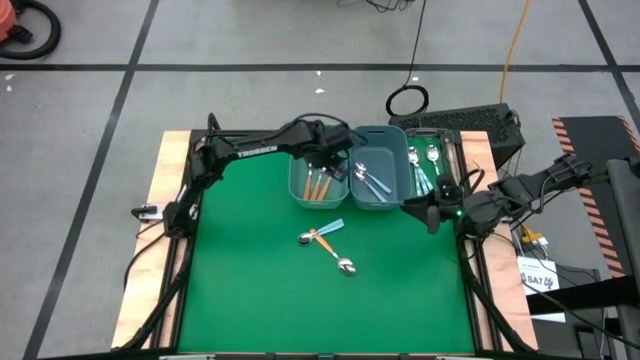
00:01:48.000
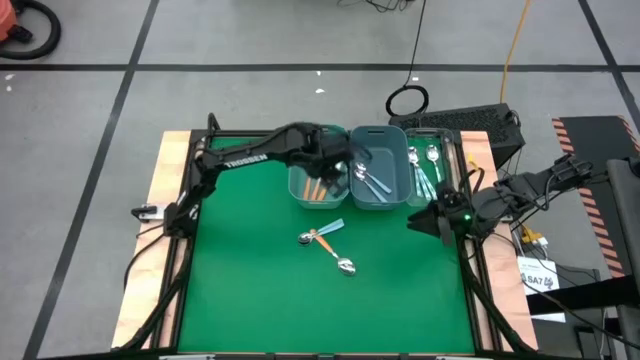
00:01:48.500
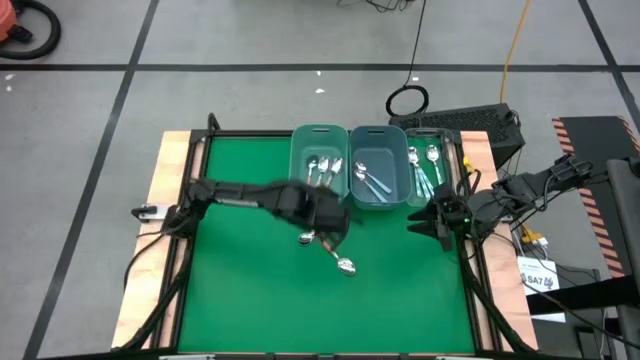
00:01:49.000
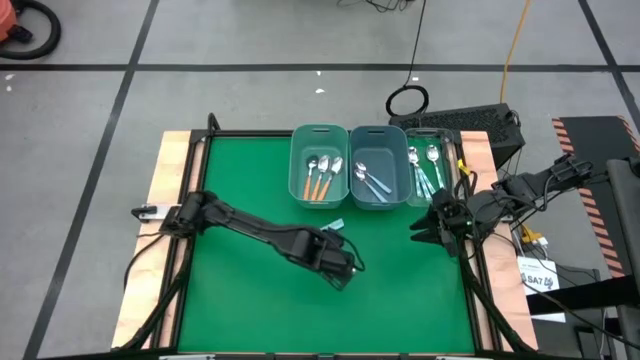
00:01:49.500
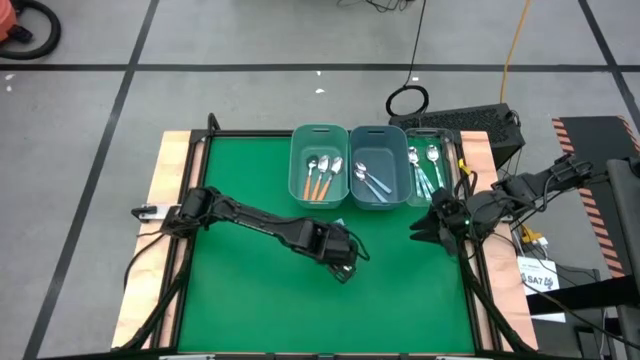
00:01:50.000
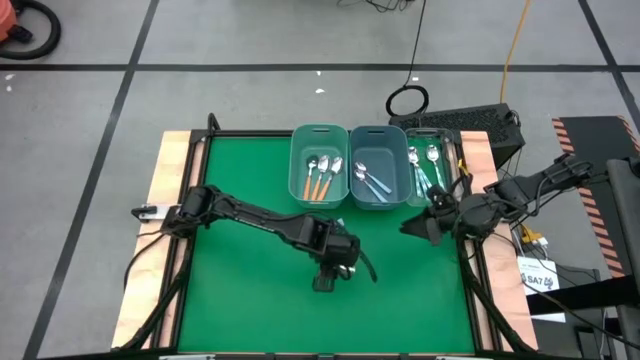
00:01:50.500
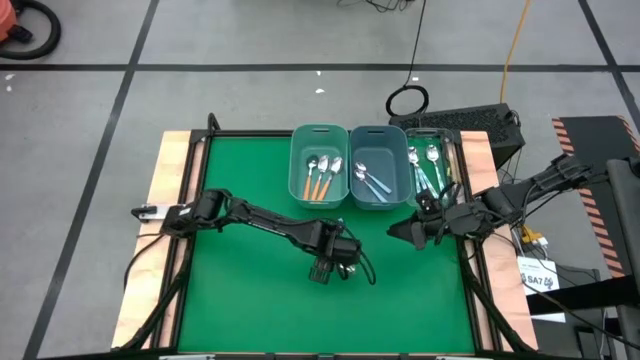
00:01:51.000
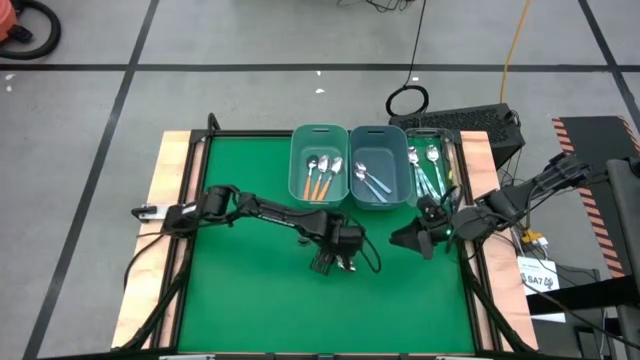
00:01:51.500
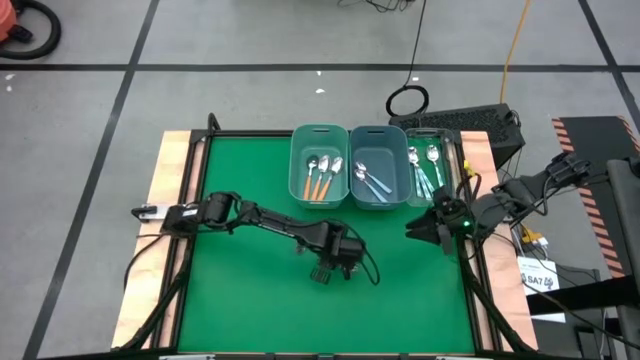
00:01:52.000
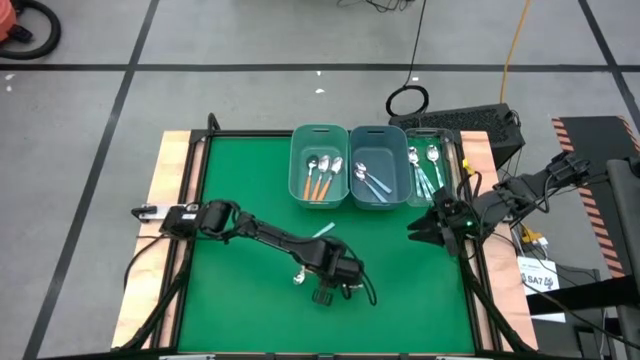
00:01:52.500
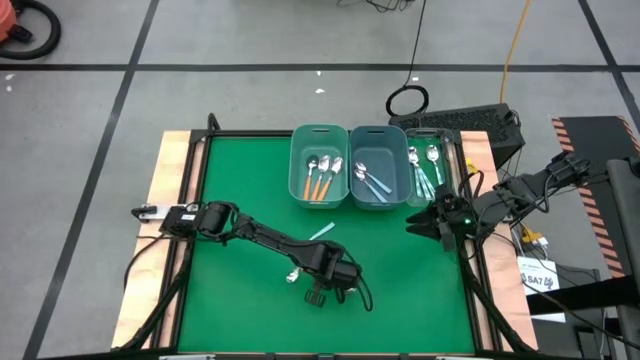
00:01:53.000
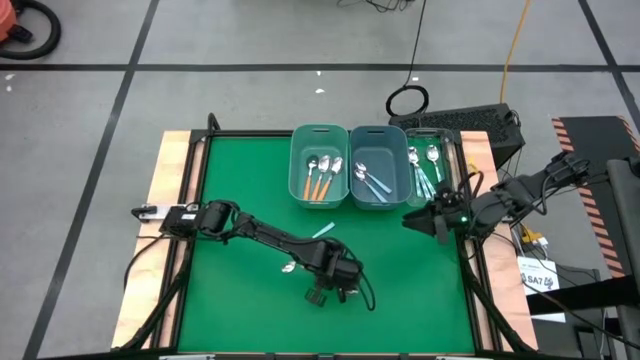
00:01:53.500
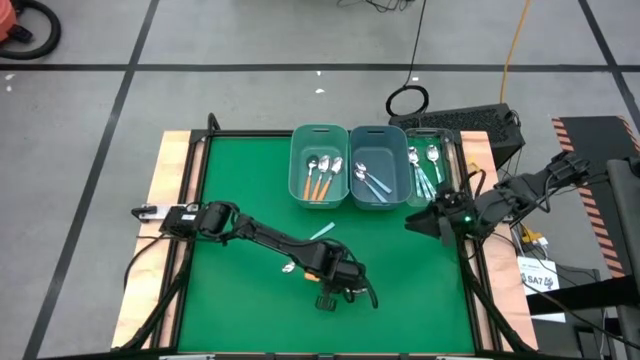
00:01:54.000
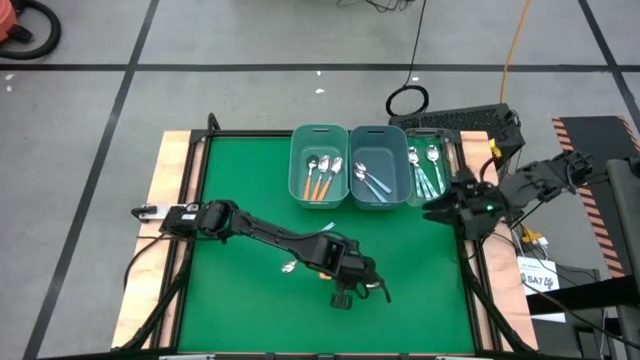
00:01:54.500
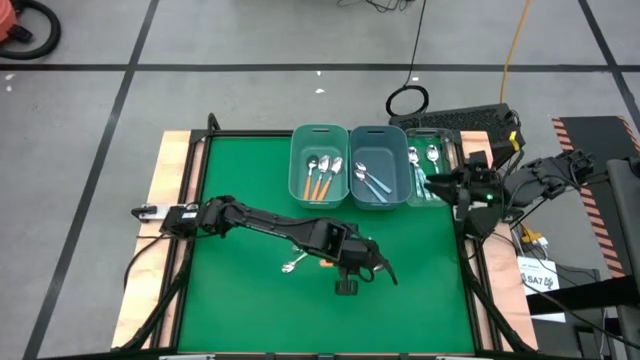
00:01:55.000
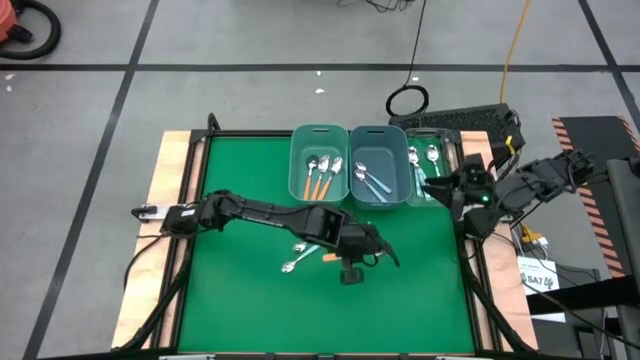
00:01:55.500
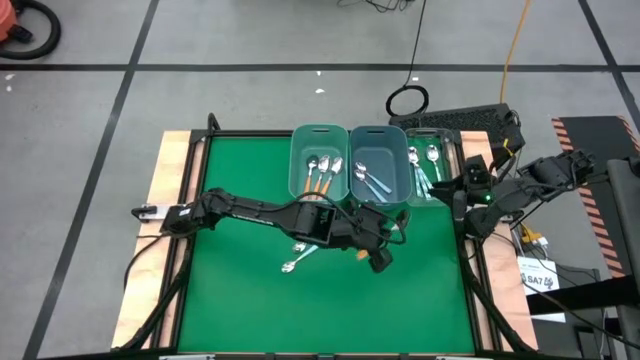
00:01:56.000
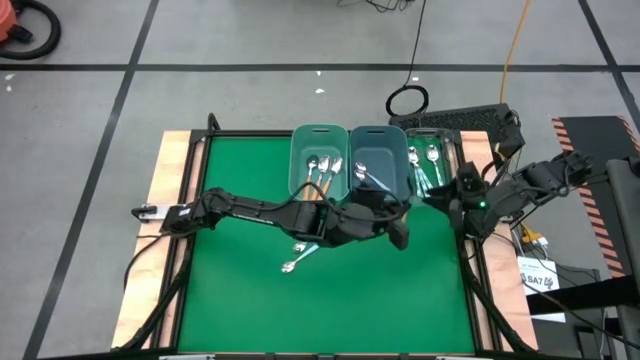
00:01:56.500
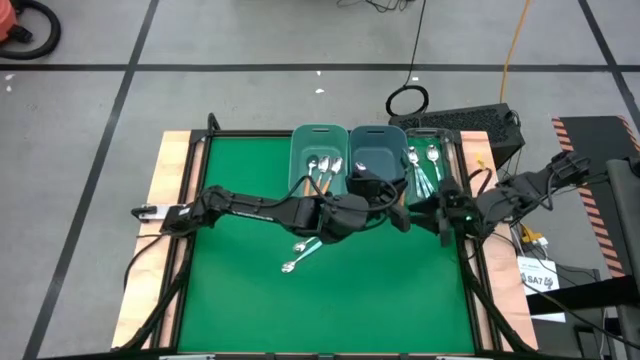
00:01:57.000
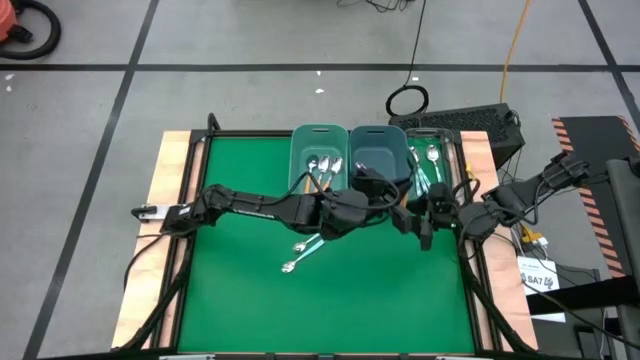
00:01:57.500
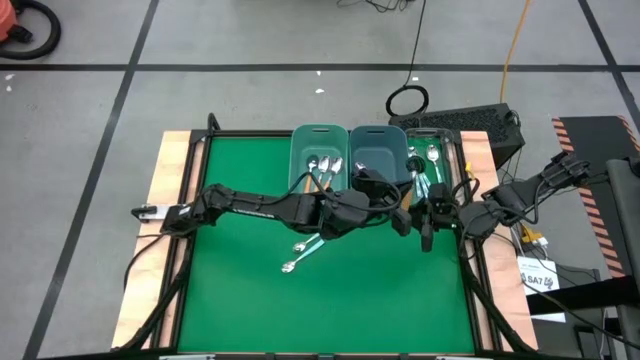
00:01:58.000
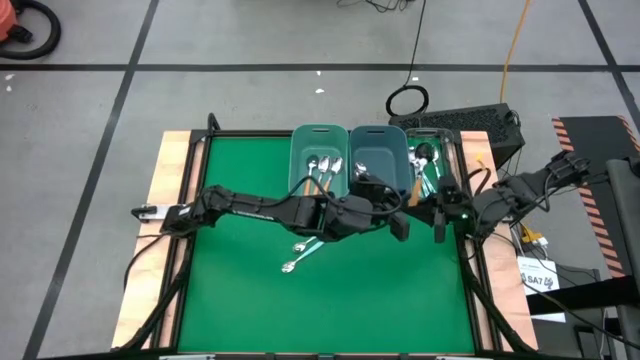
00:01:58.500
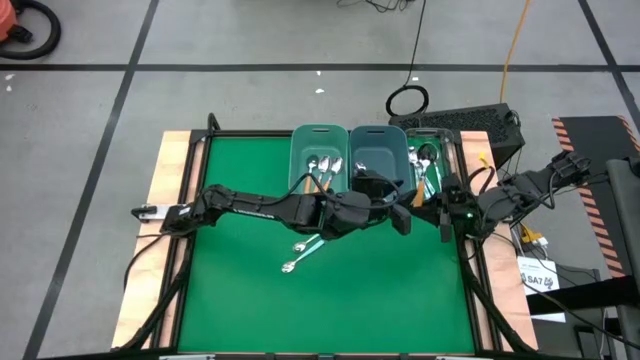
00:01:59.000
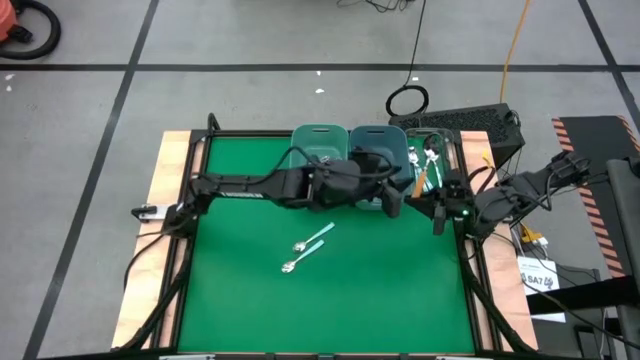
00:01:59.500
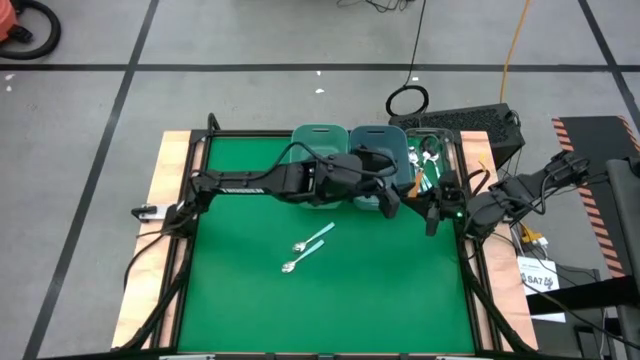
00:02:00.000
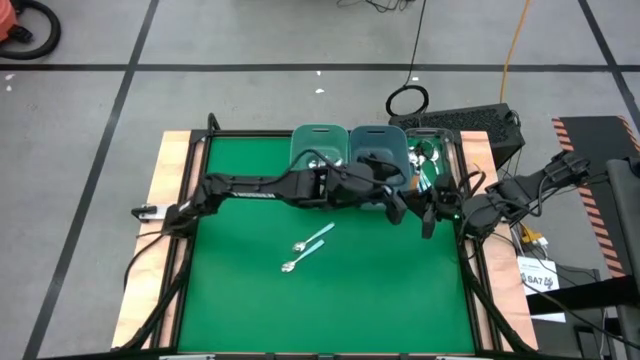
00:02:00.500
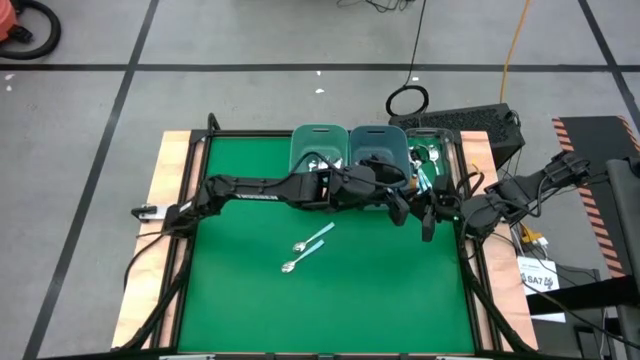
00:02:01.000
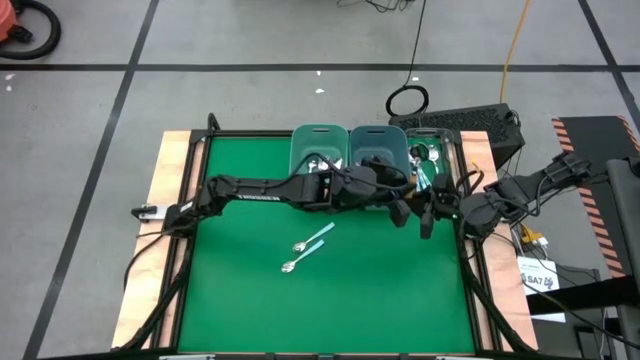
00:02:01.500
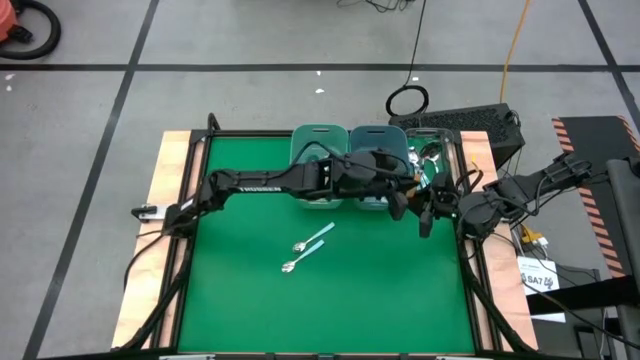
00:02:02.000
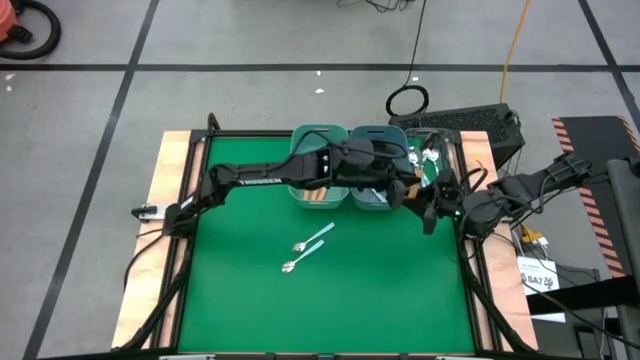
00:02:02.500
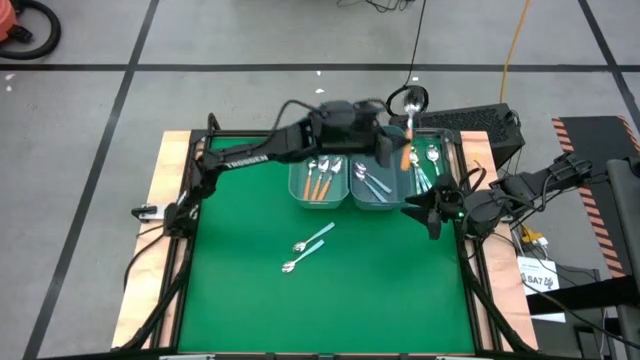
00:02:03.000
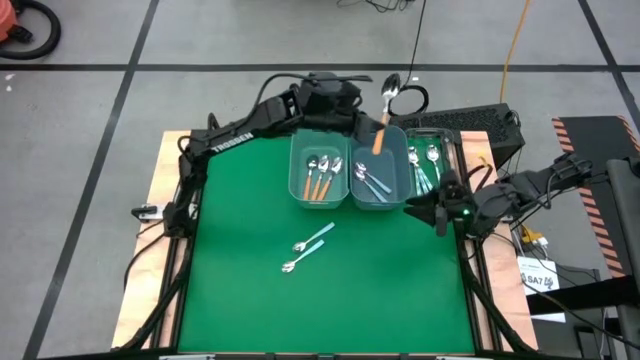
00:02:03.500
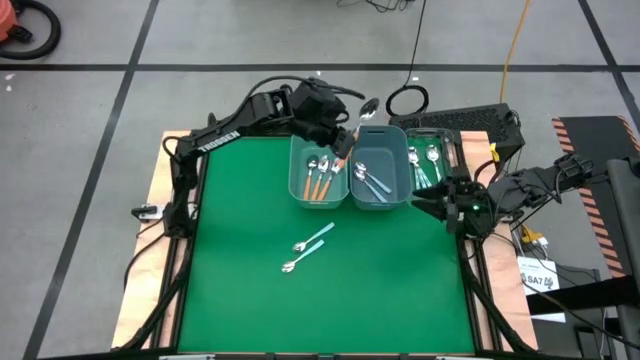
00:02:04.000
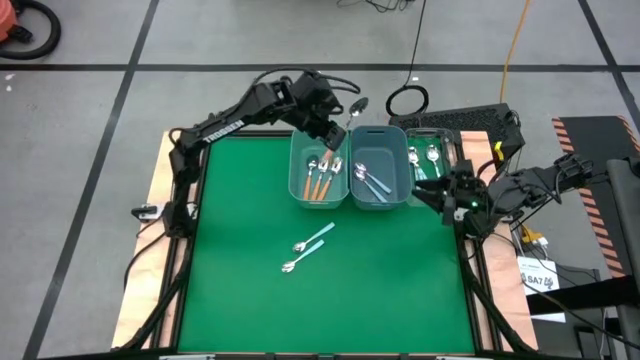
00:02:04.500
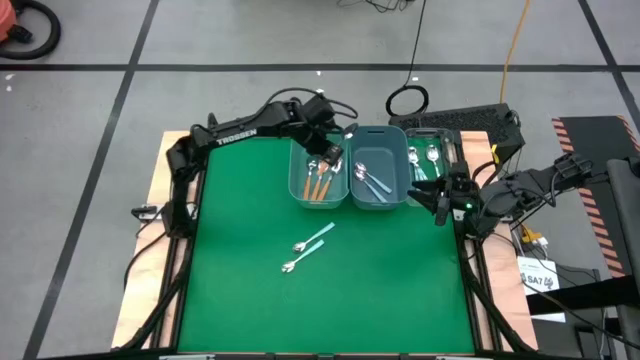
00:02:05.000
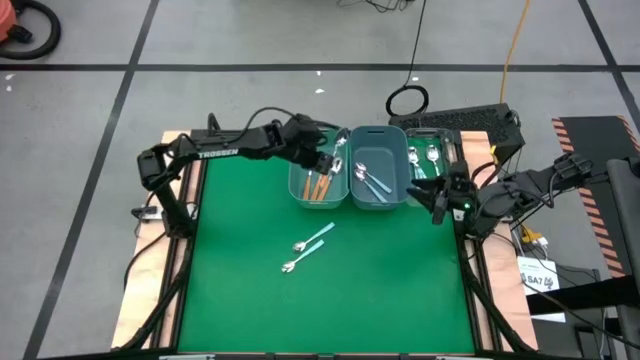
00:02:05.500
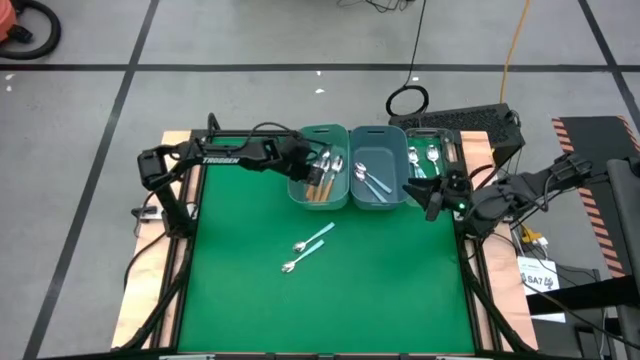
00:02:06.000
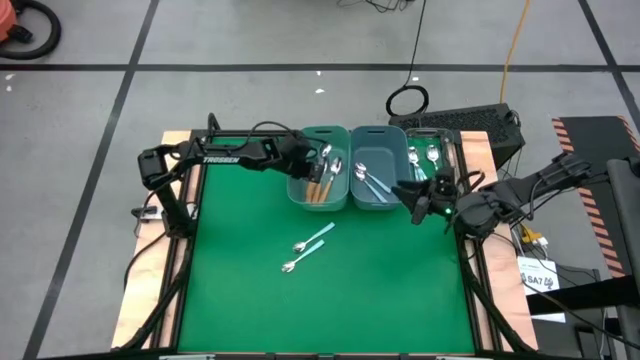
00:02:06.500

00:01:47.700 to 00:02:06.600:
Task: Sort silverware by color (type)
Put the yellow spoon into the green bin

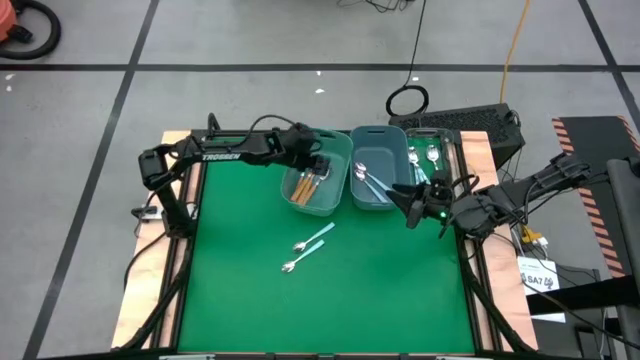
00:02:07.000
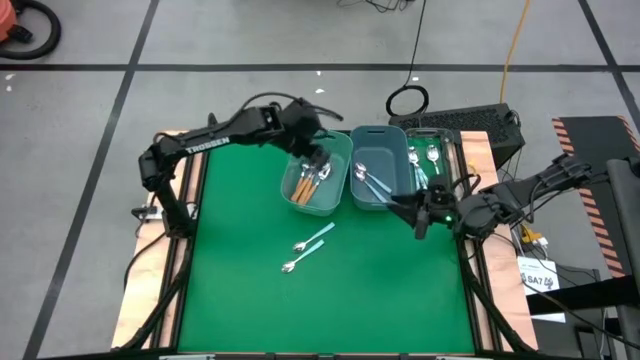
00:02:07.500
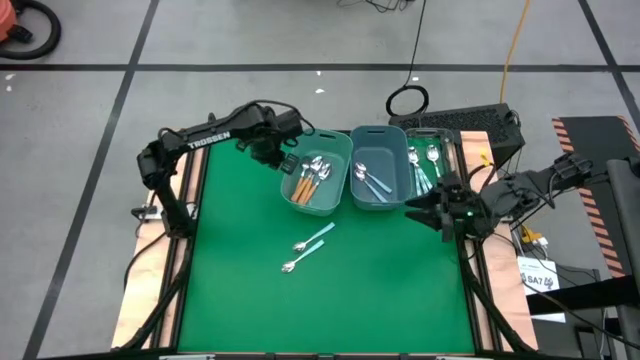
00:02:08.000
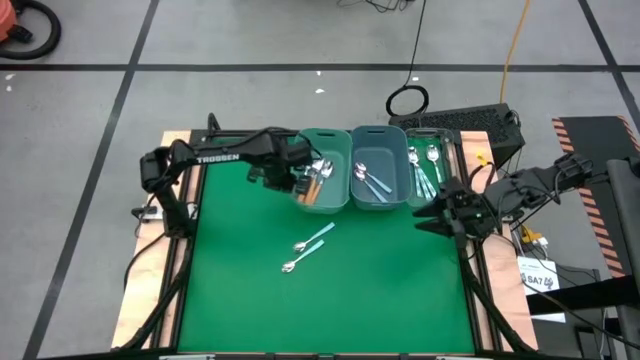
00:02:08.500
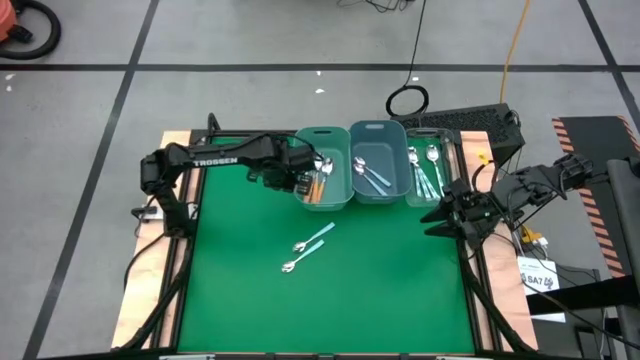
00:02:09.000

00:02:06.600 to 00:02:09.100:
Adjust the green bin
